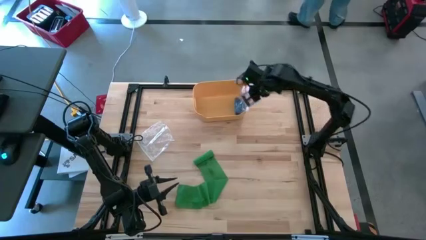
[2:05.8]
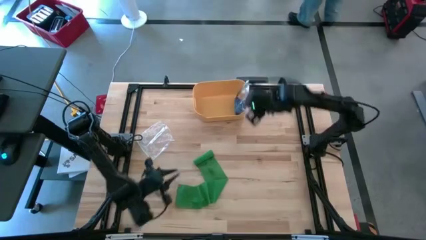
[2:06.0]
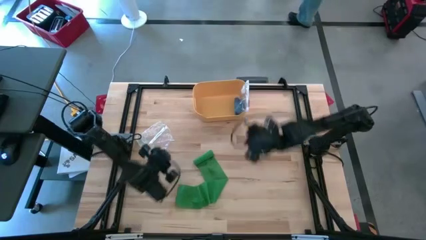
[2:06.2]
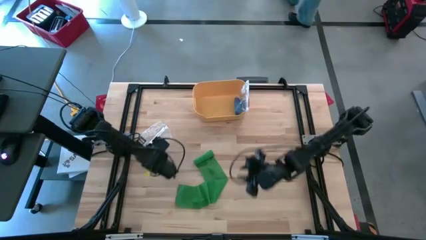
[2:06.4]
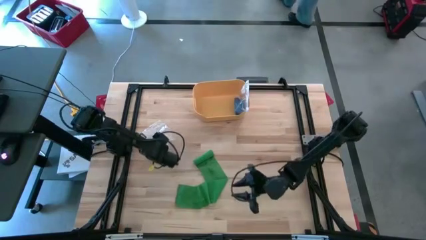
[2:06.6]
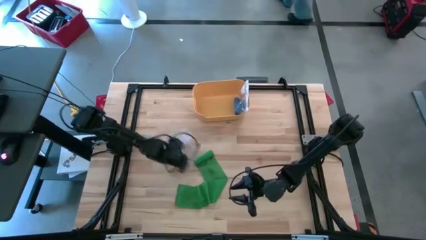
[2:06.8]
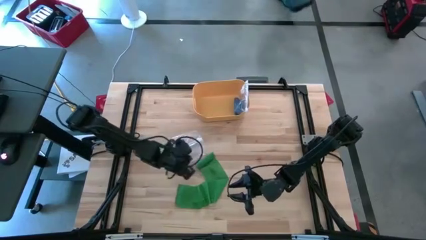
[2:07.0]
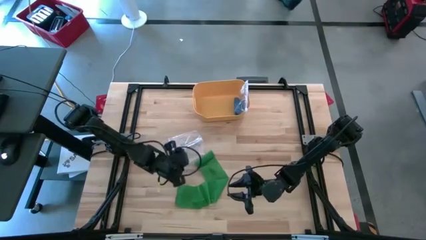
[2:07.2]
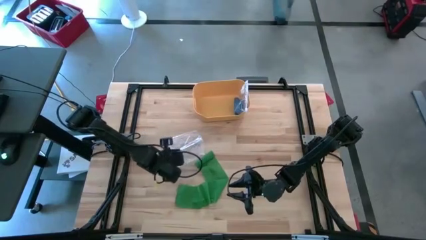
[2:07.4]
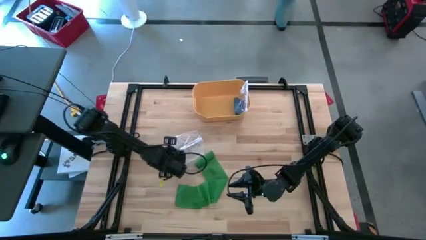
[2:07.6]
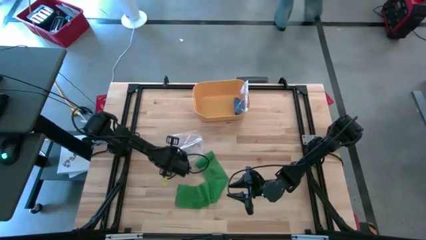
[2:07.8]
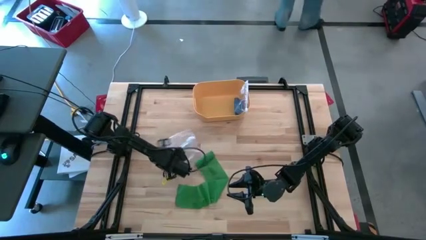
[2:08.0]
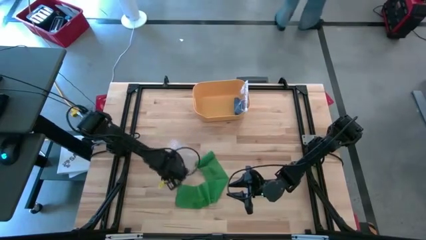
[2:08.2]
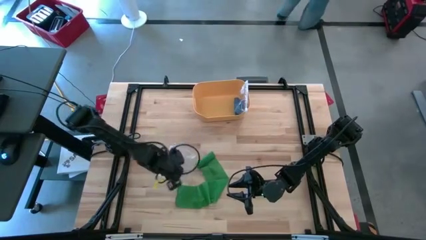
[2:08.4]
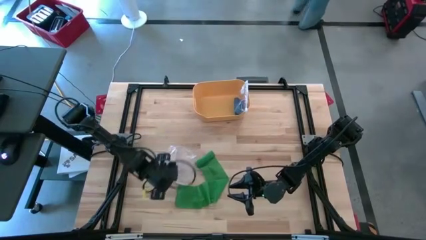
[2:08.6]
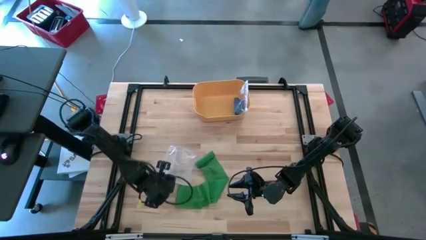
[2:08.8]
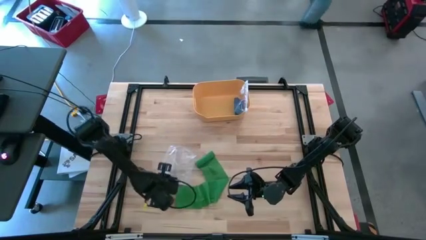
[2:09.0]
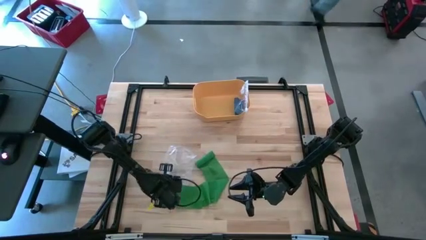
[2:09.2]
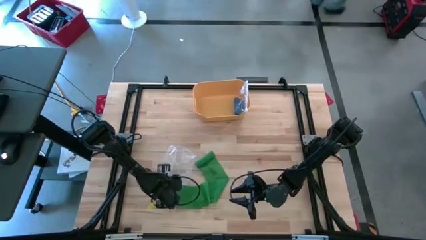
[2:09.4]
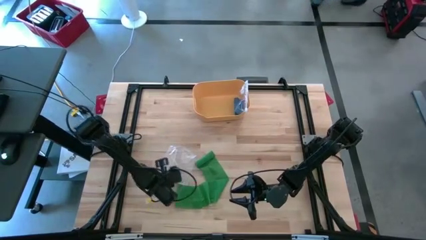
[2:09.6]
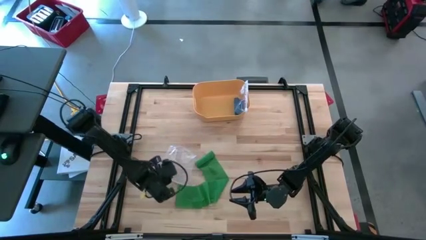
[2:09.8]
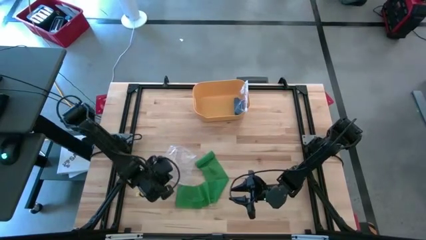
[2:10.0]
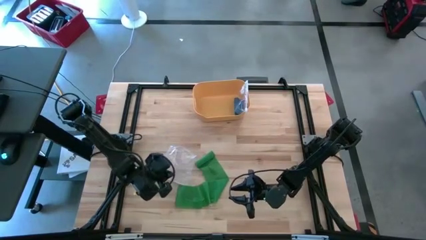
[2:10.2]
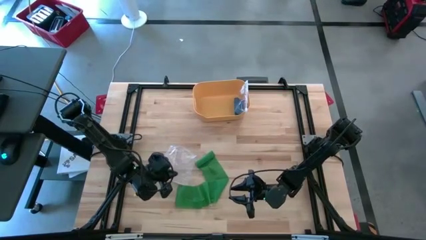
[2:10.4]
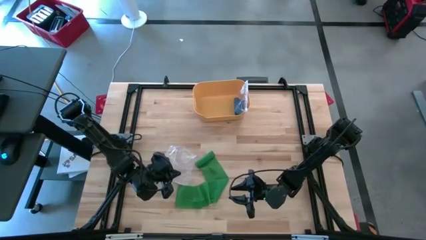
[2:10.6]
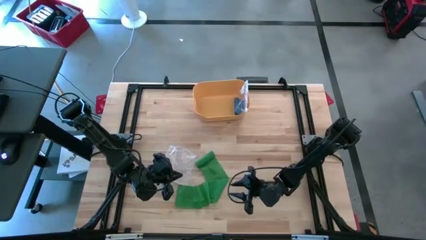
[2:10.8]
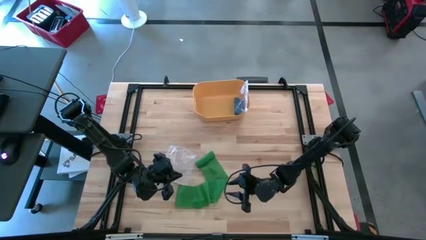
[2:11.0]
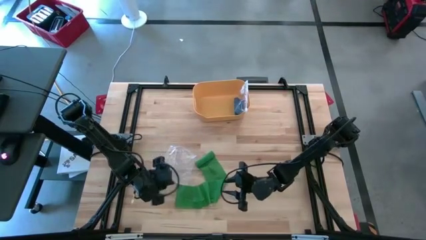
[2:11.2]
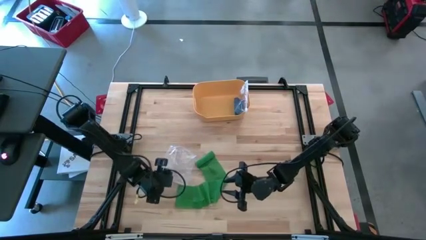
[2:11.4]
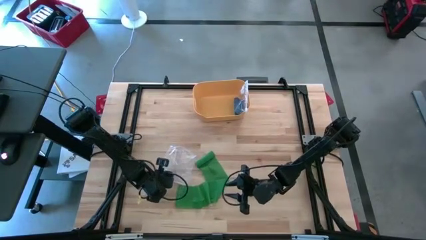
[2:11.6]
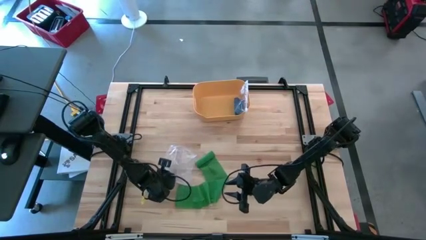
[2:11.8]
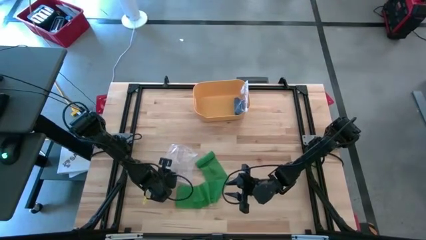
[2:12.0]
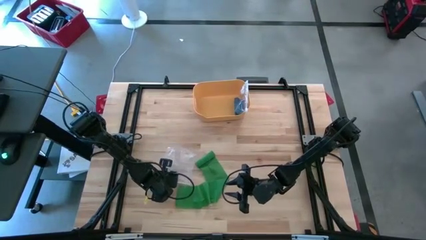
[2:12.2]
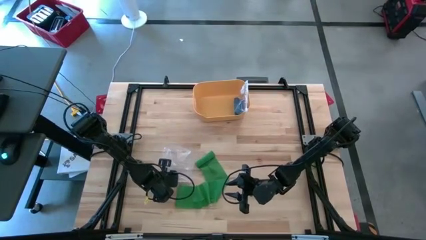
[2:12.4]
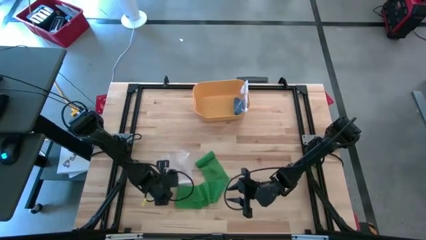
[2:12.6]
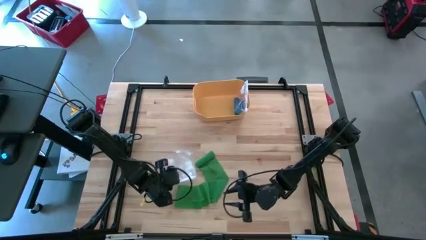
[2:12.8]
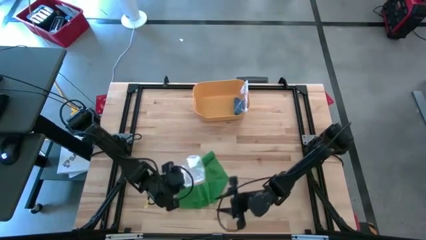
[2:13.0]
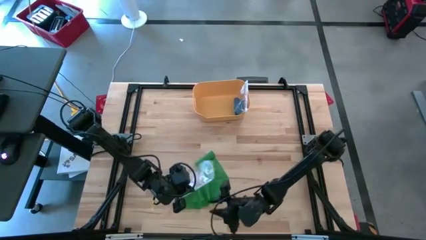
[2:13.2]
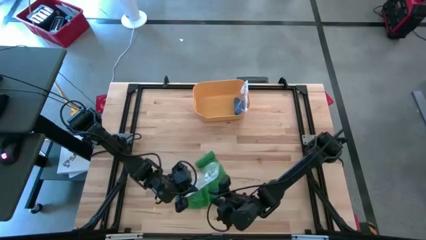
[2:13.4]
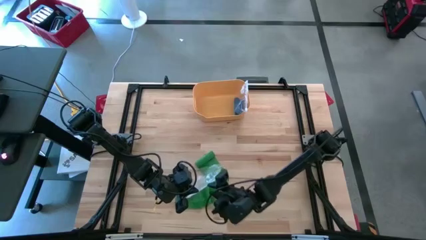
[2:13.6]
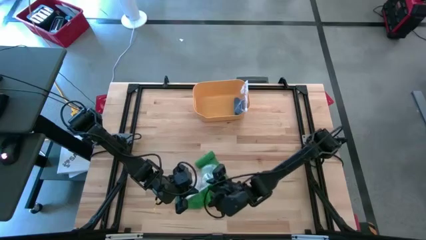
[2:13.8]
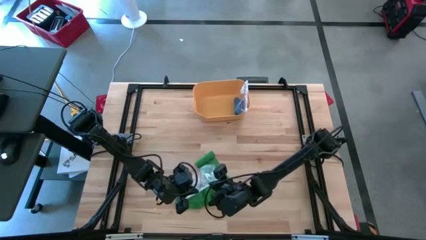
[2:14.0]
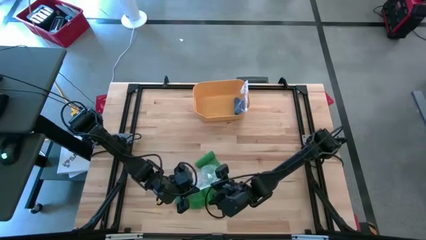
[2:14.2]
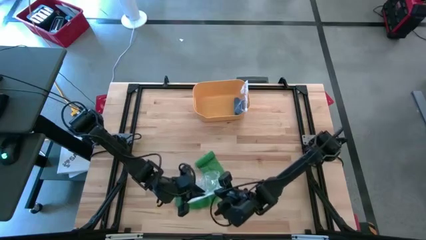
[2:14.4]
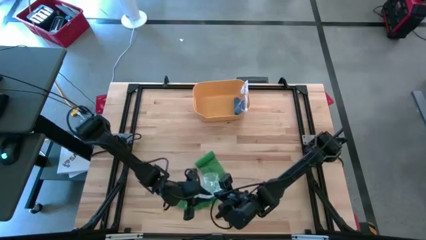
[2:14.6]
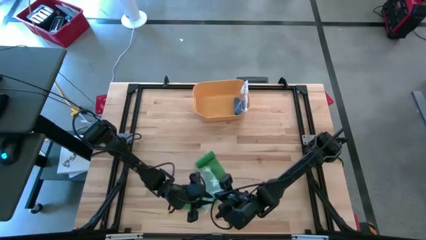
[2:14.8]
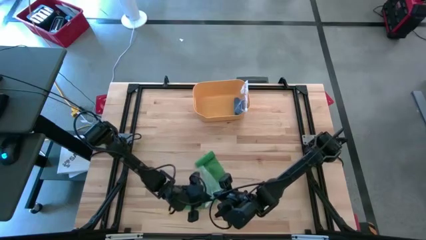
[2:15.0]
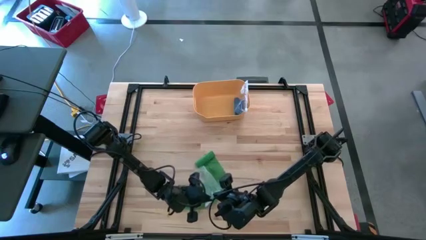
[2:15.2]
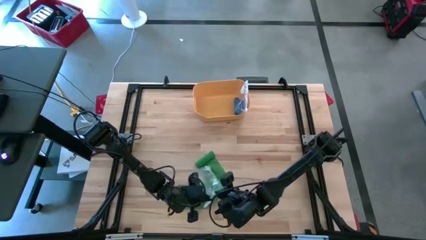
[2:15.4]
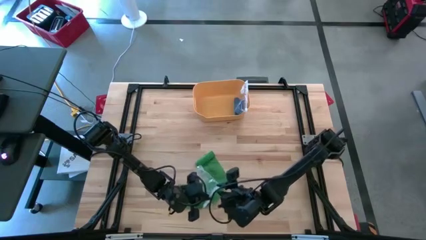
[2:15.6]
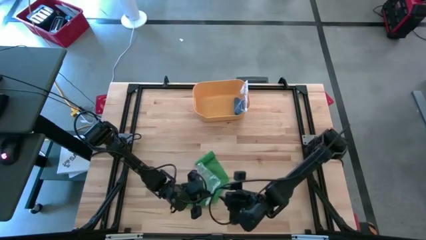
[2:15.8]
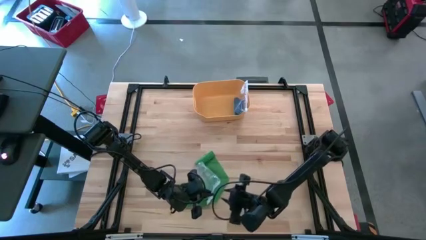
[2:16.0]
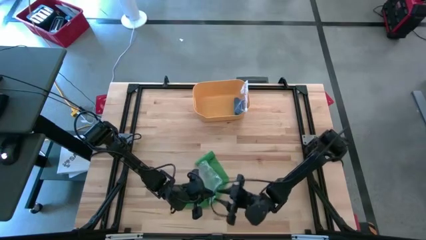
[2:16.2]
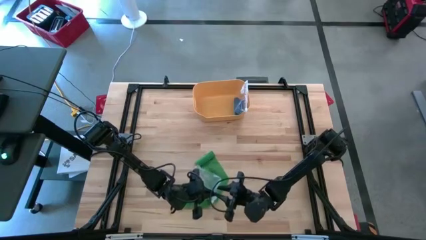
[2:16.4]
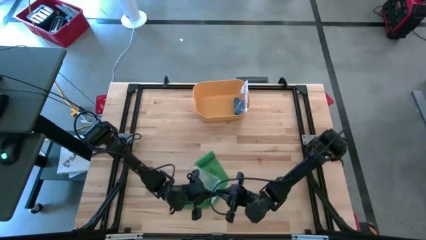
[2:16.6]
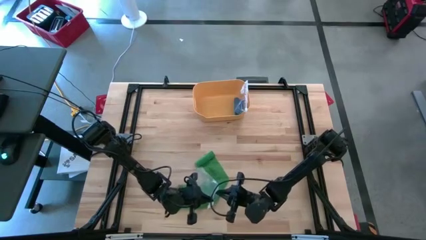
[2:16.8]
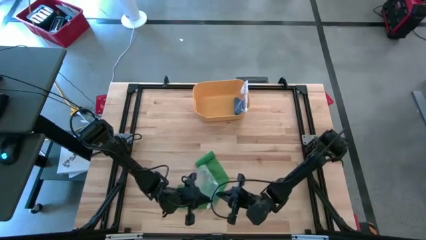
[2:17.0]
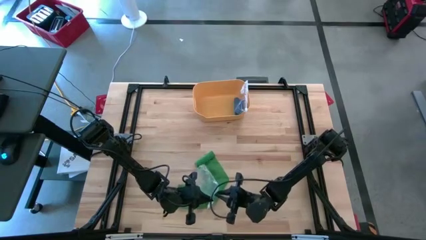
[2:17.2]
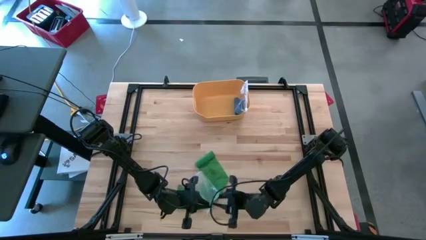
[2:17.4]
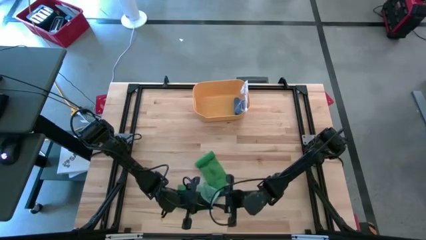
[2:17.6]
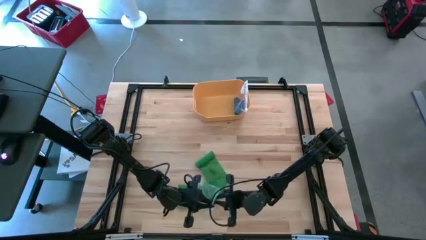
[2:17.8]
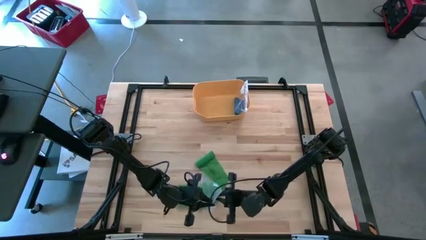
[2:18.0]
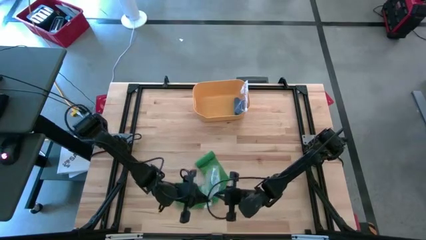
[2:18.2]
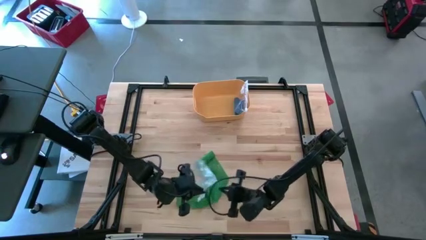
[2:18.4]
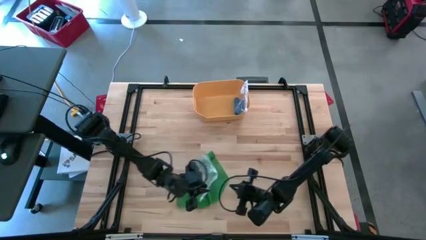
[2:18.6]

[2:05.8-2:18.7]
Task: Roll bandage
Open the transparent zip bag

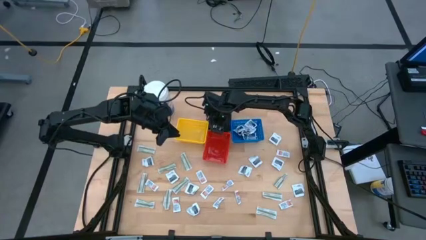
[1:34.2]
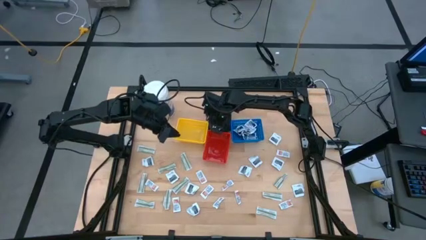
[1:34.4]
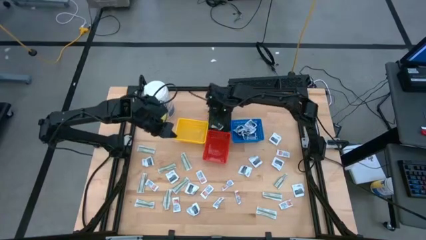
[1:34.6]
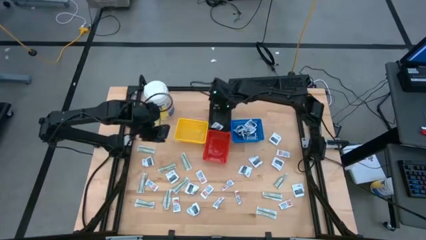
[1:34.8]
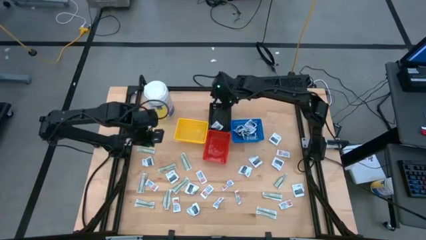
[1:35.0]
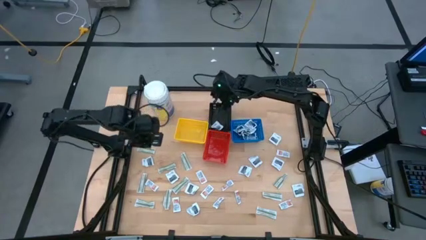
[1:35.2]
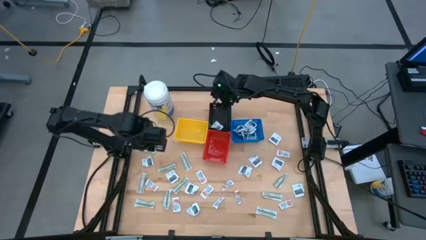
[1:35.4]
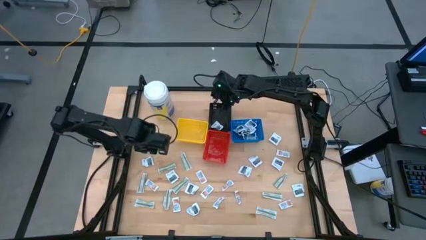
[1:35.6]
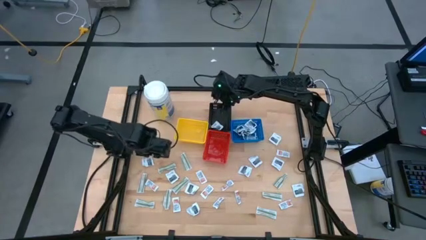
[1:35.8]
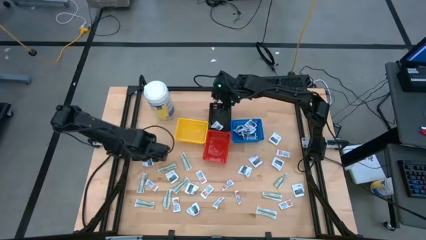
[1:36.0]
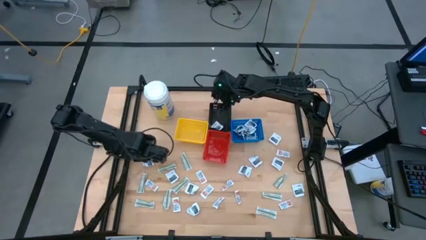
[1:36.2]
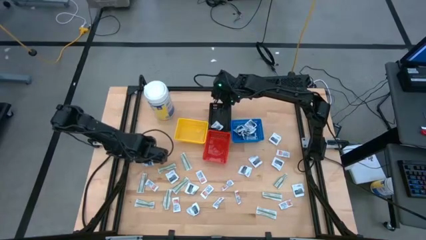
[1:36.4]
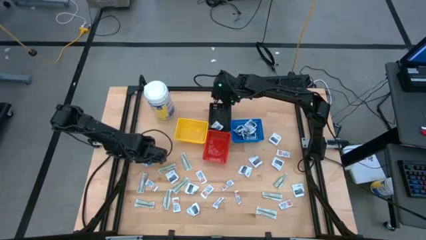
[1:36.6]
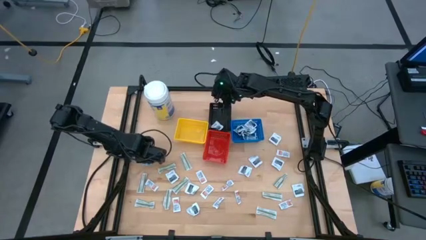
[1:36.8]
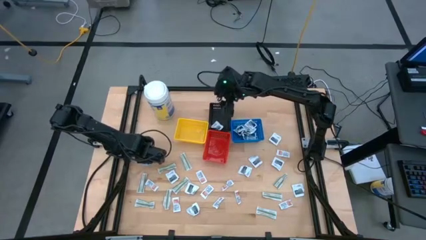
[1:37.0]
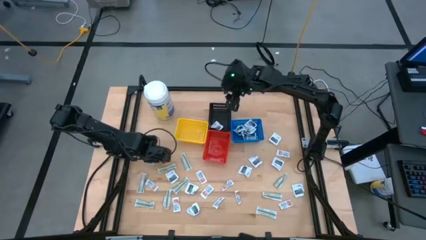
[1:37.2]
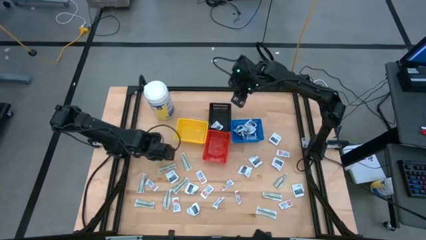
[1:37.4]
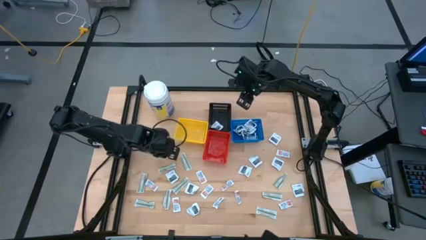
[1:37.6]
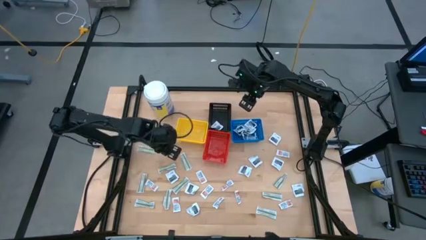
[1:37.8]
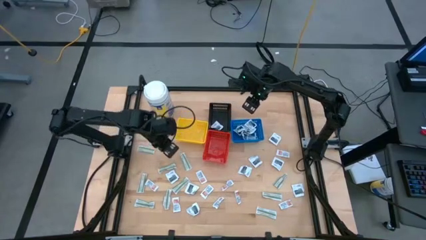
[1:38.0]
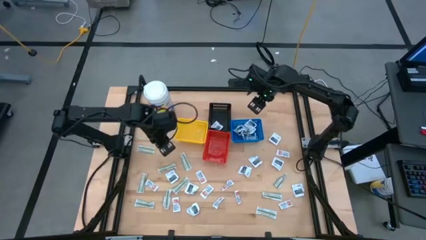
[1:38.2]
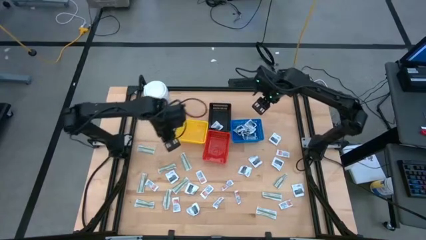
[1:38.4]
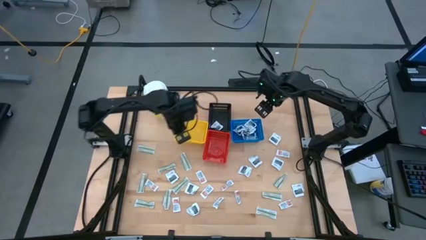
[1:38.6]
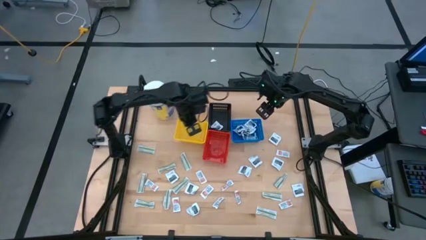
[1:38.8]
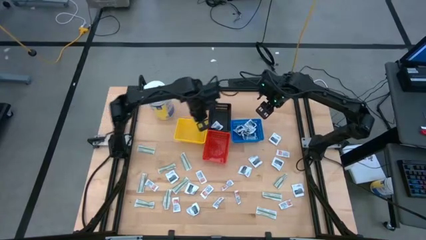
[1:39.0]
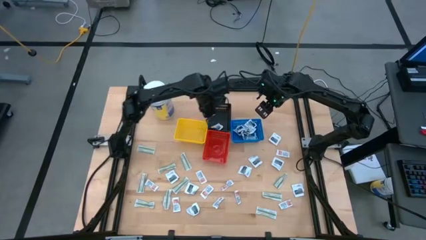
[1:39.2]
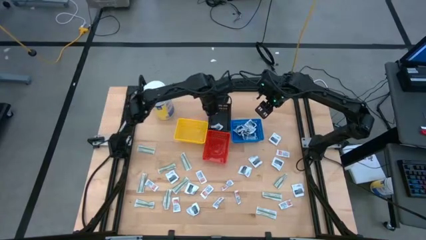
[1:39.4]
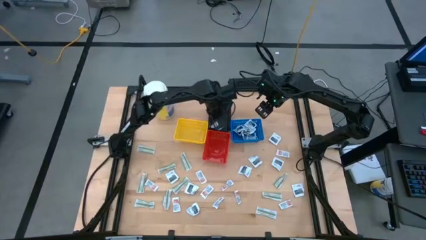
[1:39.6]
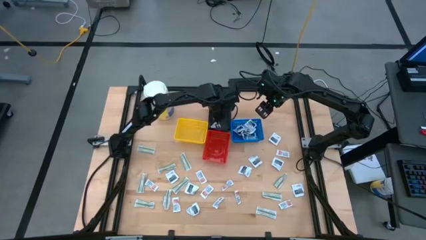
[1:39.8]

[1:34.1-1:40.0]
Task: Pick & Place First Aid Supplies
Put the towelette pack into the black bin
